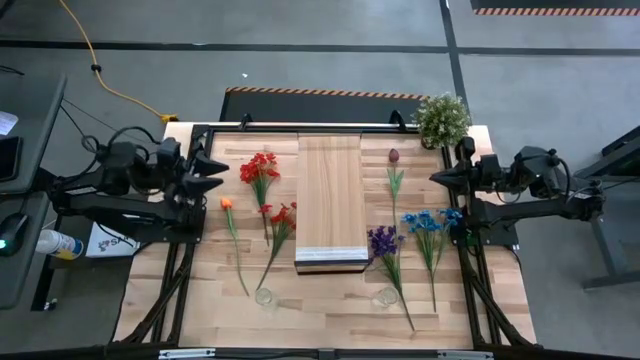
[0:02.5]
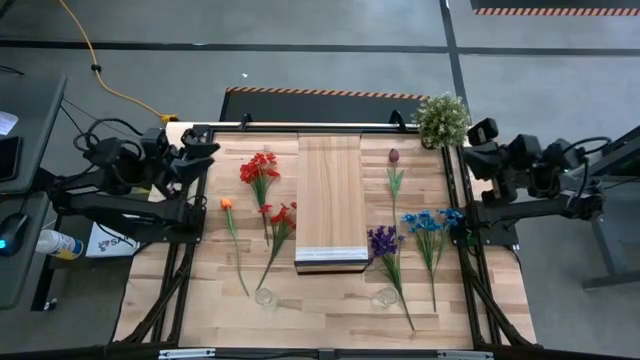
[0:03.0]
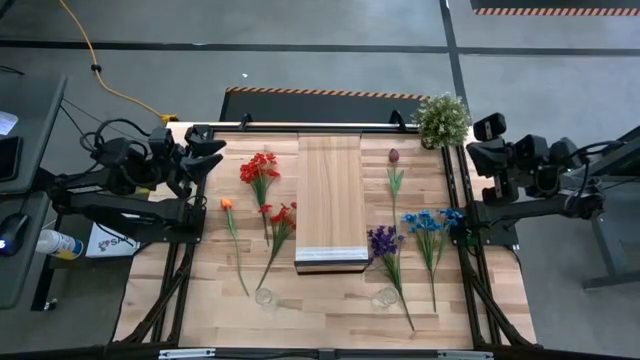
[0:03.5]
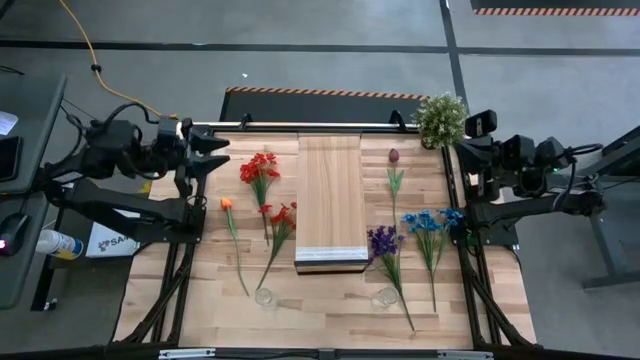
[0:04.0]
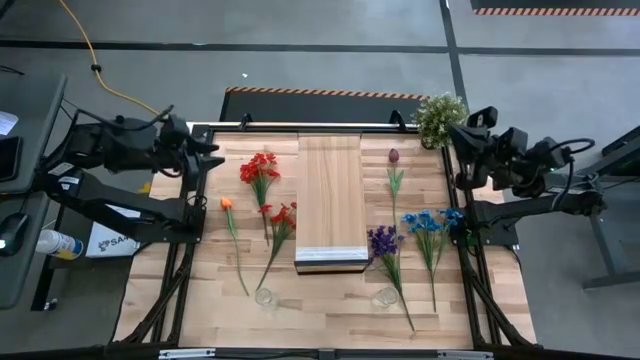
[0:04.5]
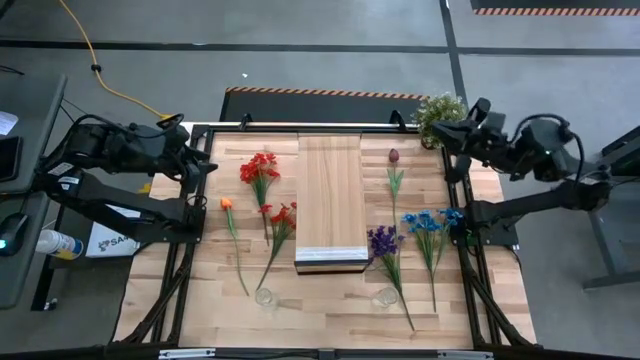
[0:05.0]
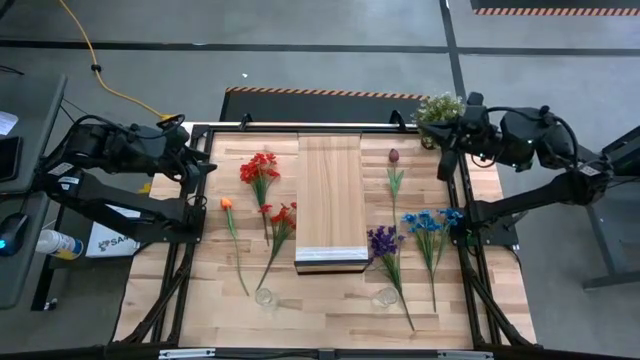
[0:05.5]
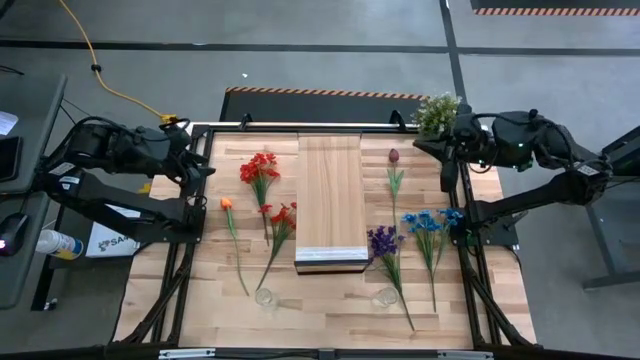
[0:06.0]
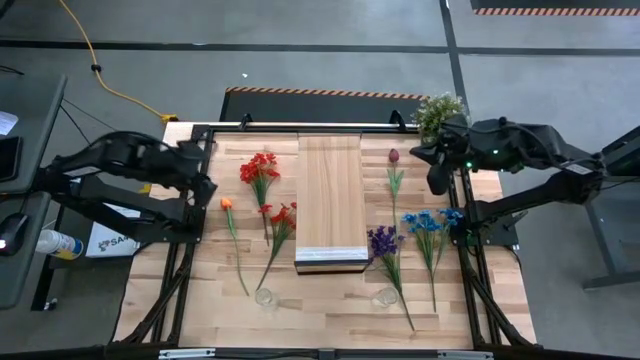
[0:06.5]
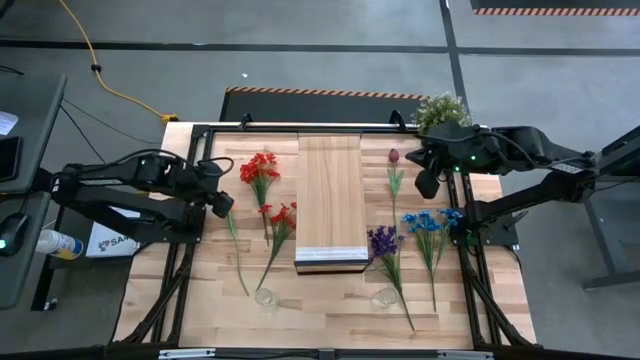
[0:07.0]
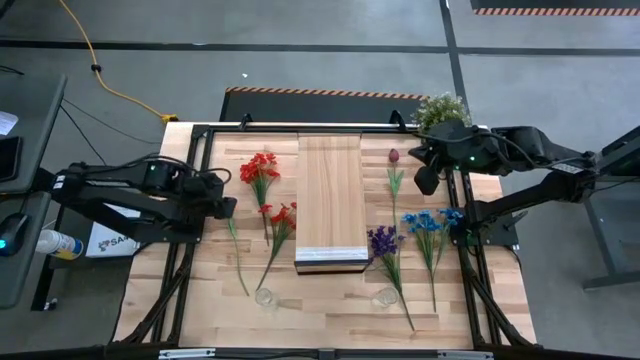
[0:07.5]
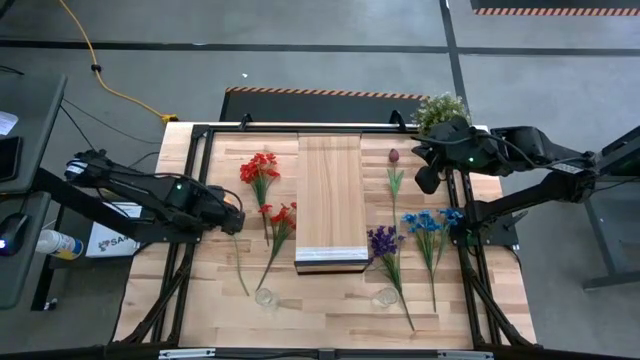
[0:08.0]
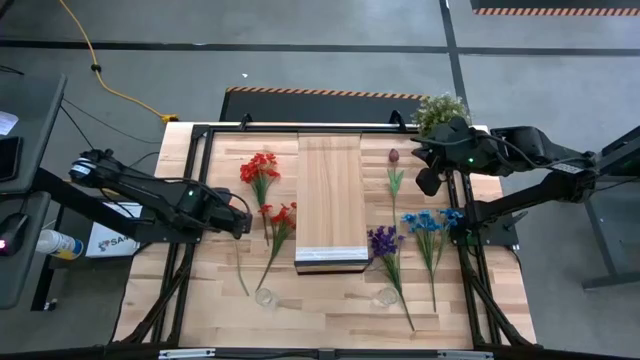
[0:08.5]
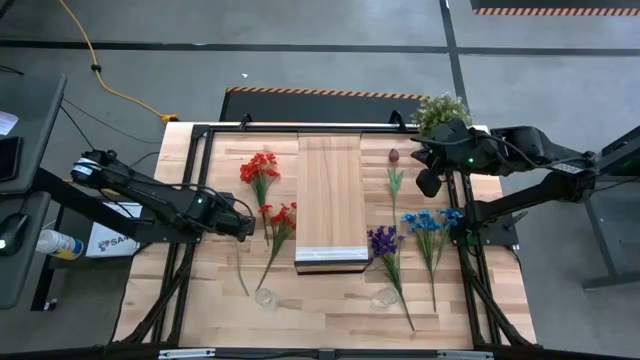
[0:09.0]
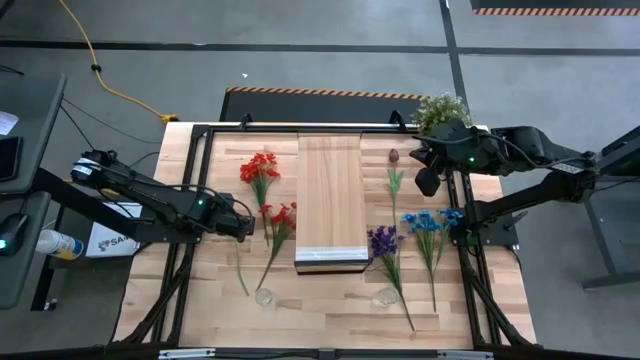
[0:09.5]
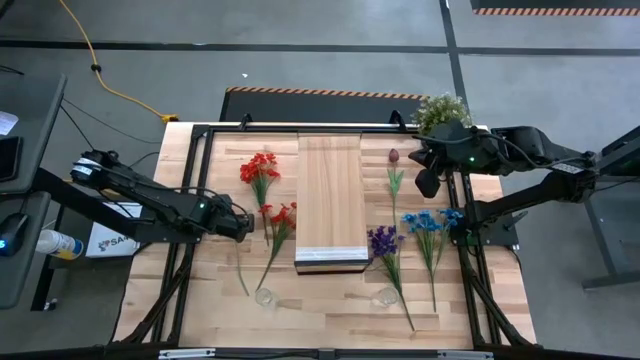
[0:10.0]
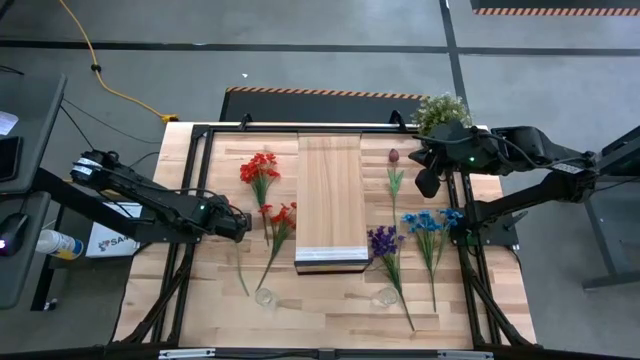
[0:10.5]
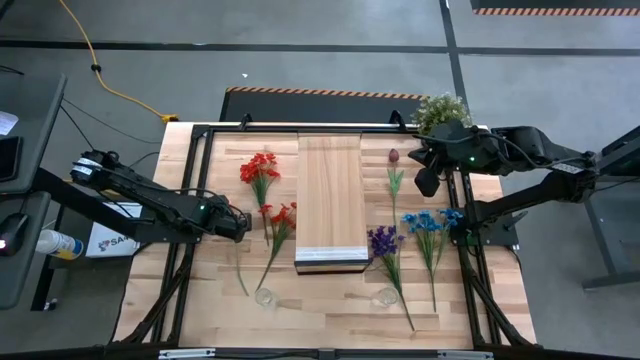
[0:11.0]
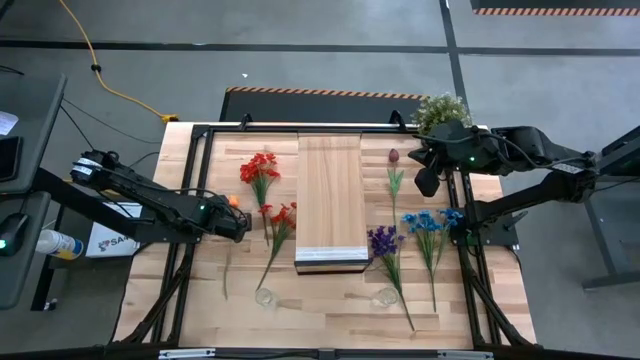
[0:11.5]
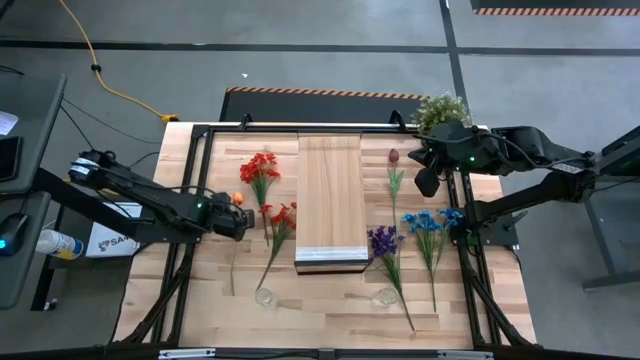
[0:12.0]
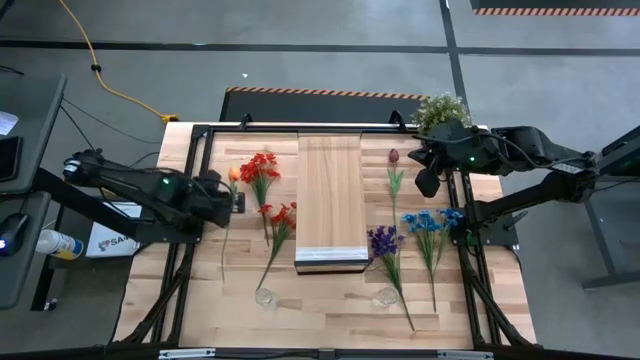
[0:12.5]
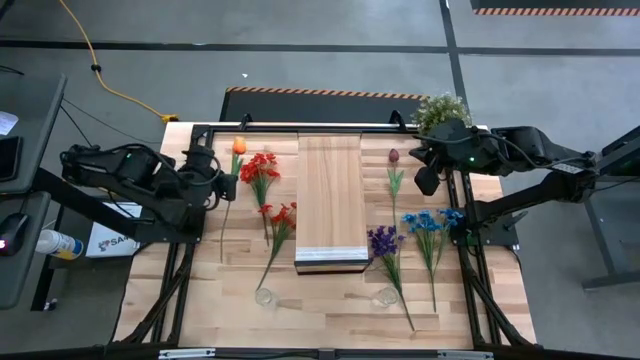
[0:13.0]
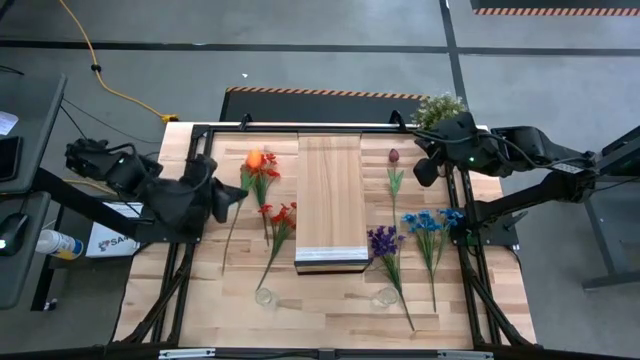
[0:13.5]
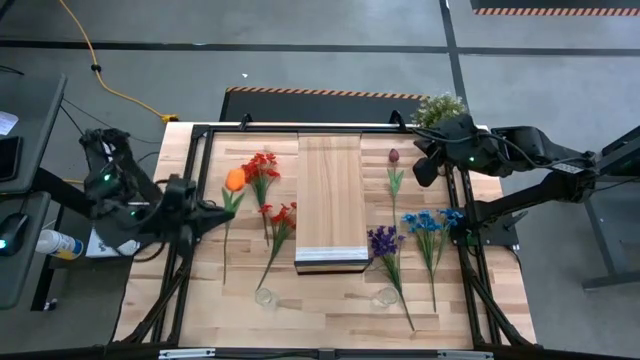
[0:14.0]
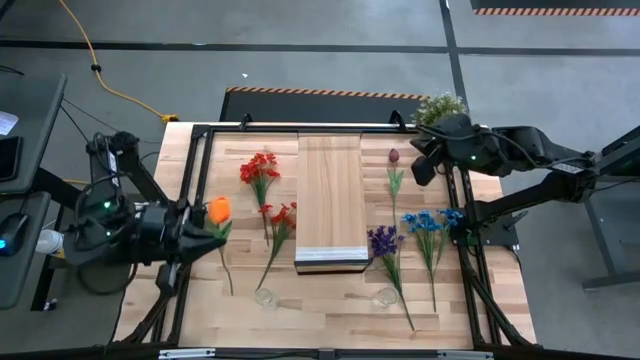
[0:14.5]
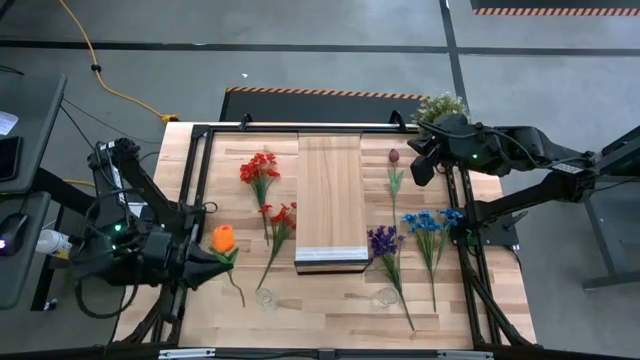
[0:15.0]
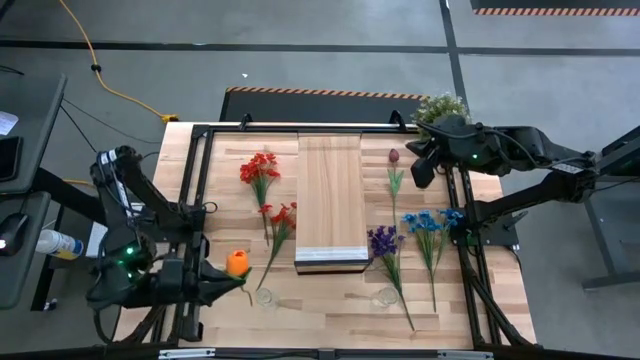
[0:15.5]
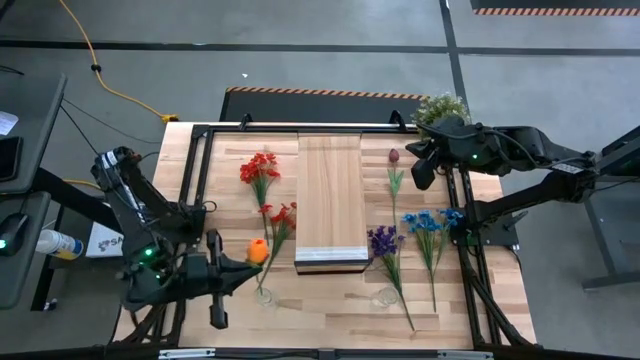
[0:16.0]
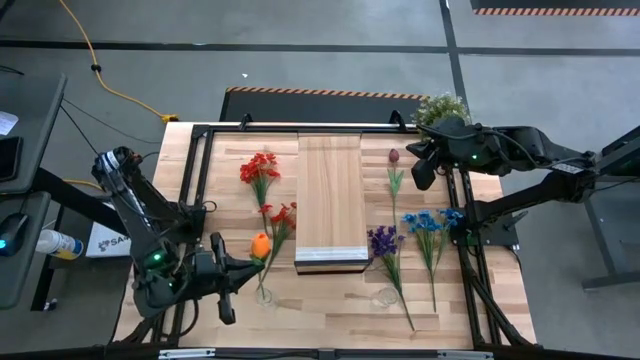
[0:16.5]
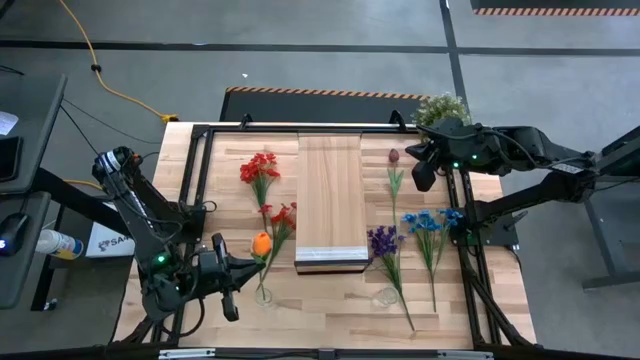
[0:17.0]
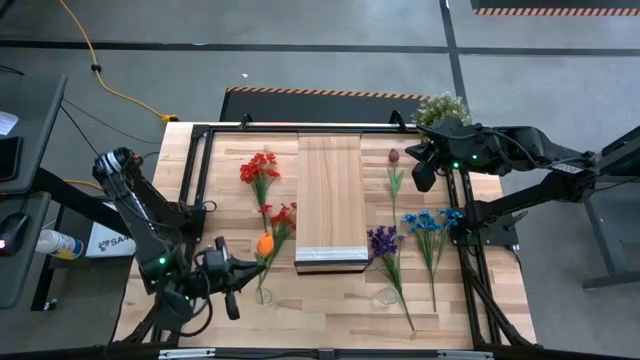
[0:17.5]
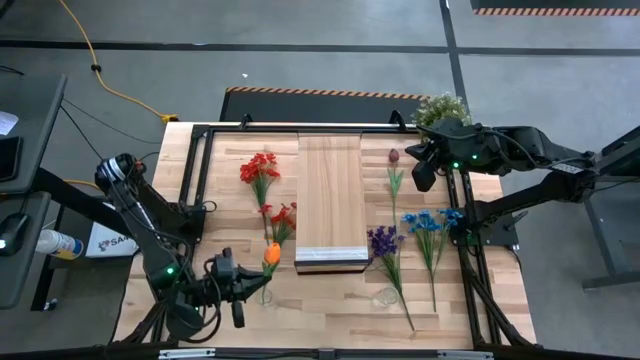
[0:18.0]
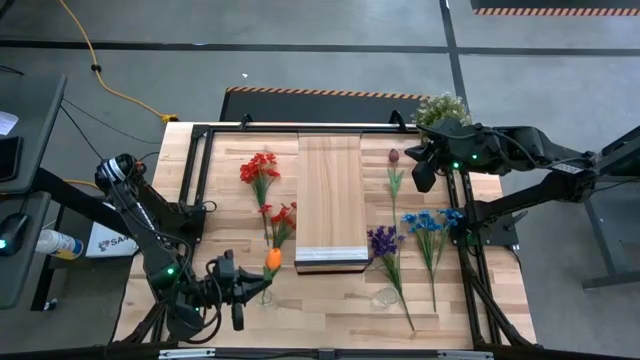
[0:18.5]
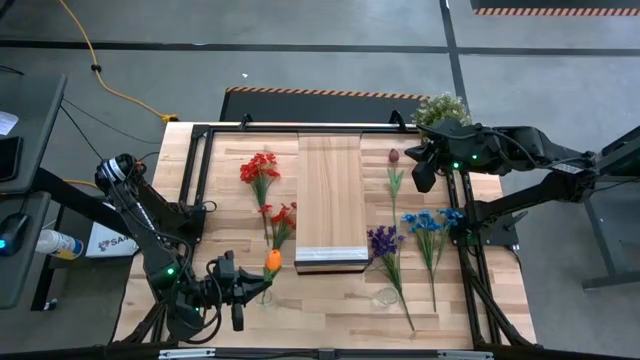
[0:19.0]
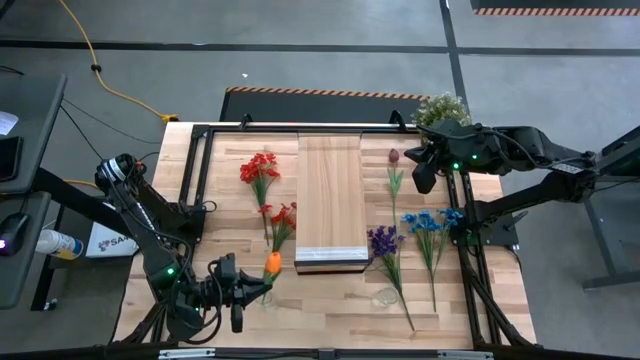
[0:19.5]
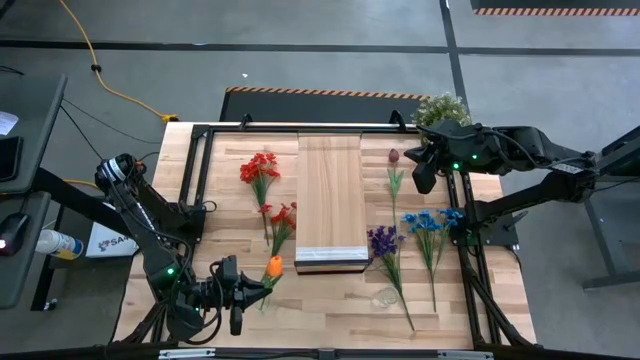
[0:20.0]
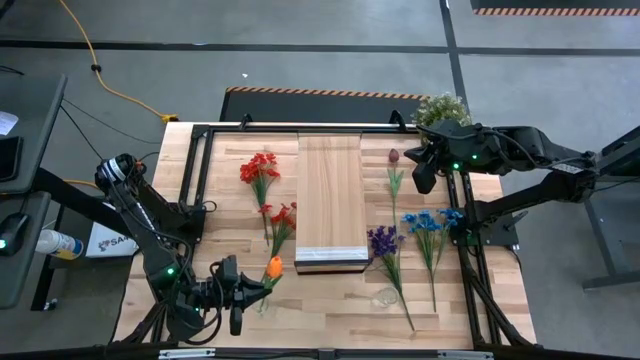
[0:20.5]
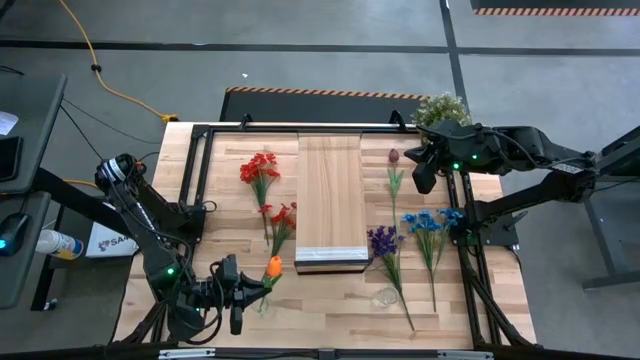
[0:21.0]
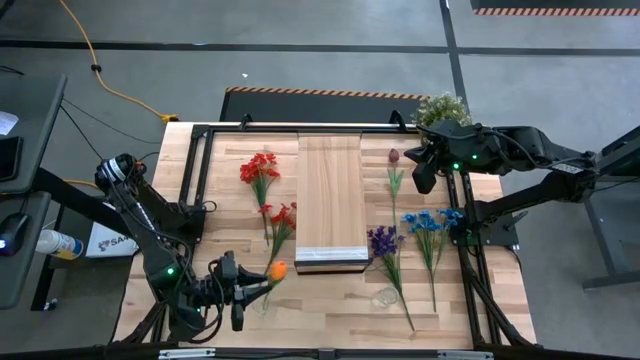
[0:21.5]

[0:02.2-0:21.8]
Task: Pick and place flowers into a vace then onto a shelf
Put the orange flower into the left transparent vase
